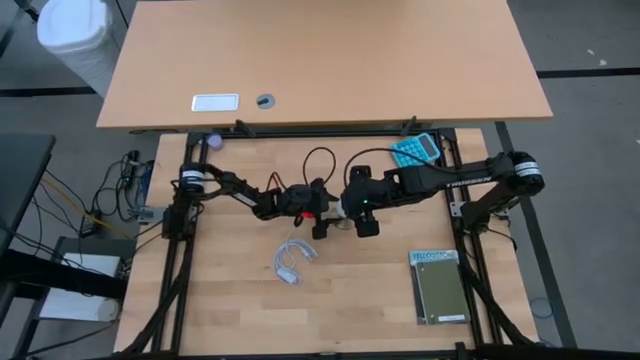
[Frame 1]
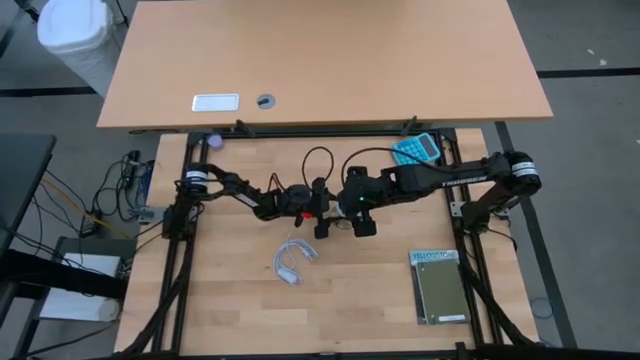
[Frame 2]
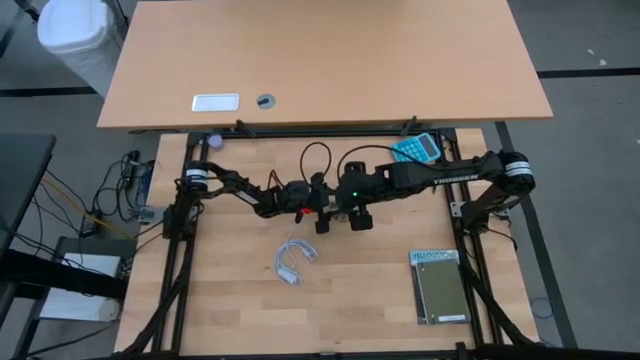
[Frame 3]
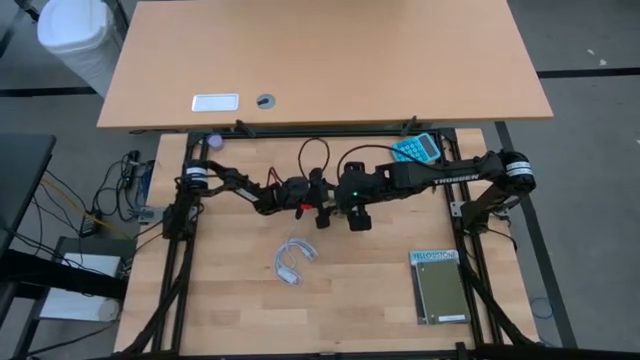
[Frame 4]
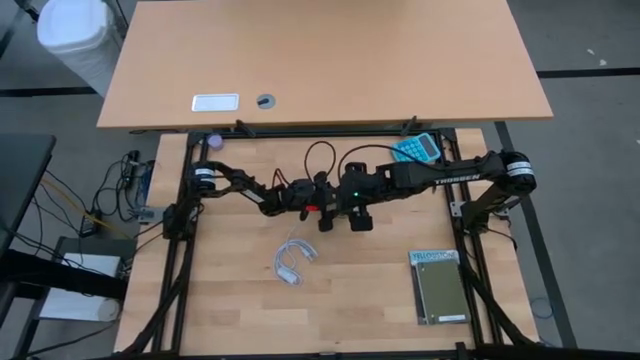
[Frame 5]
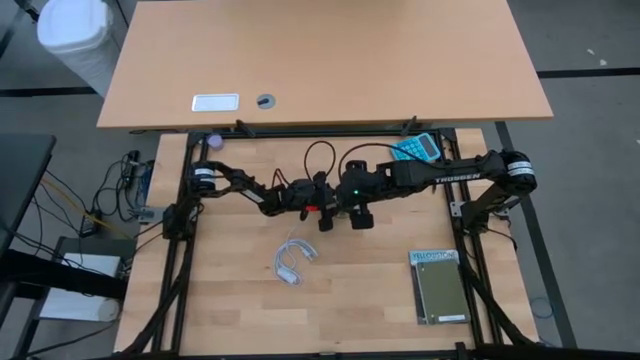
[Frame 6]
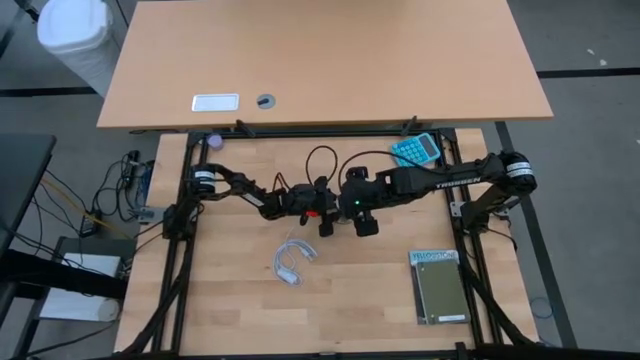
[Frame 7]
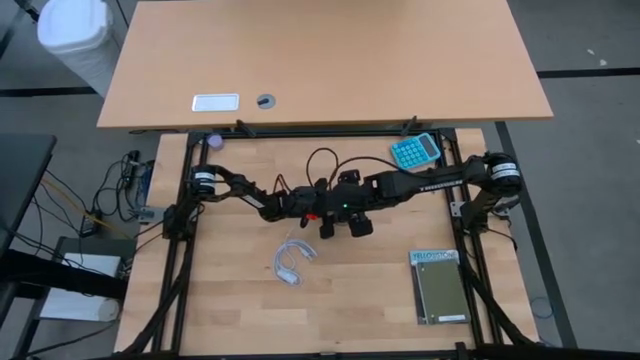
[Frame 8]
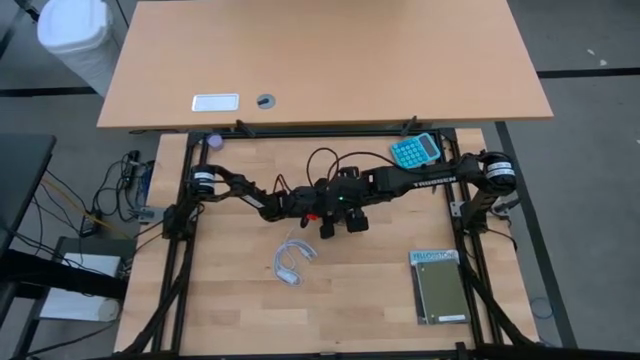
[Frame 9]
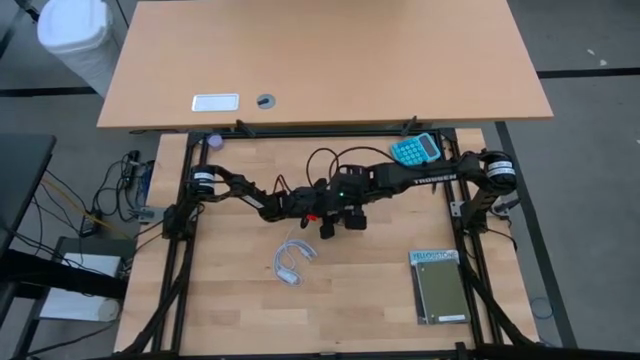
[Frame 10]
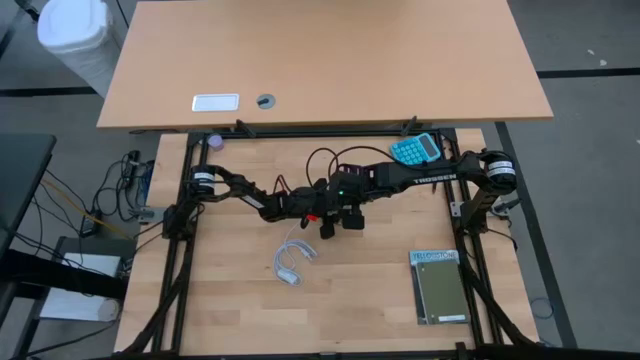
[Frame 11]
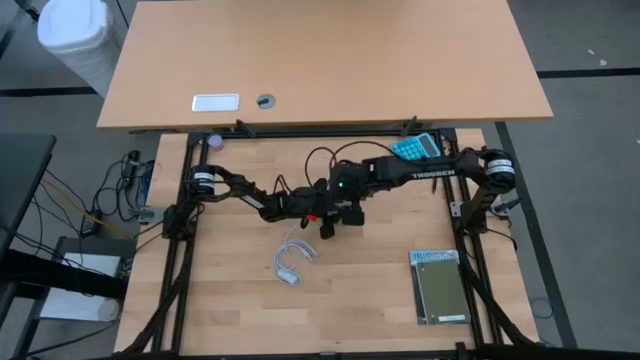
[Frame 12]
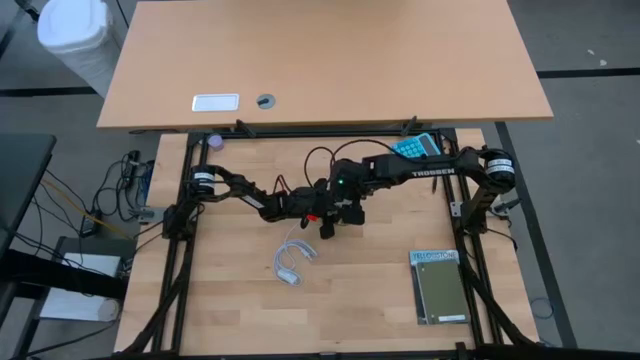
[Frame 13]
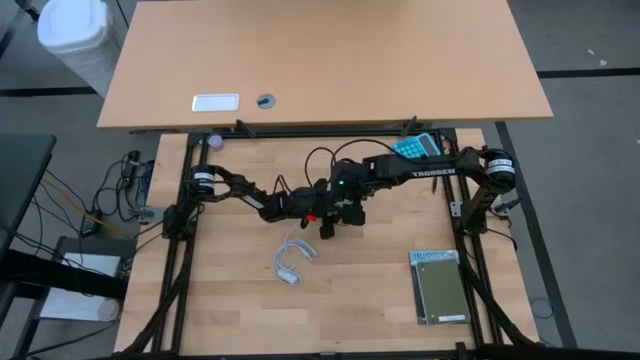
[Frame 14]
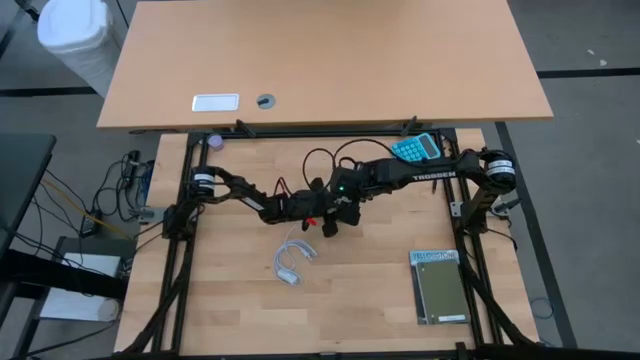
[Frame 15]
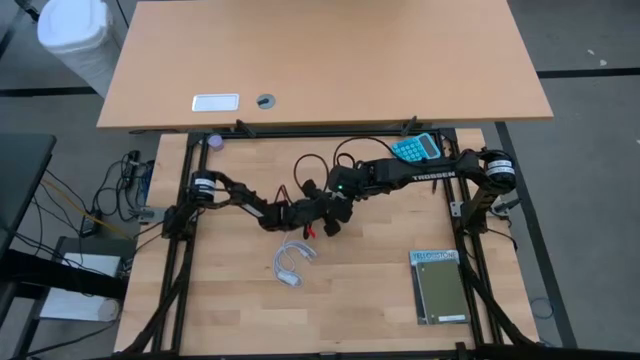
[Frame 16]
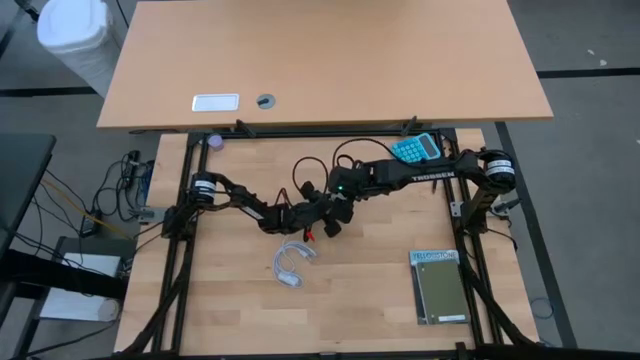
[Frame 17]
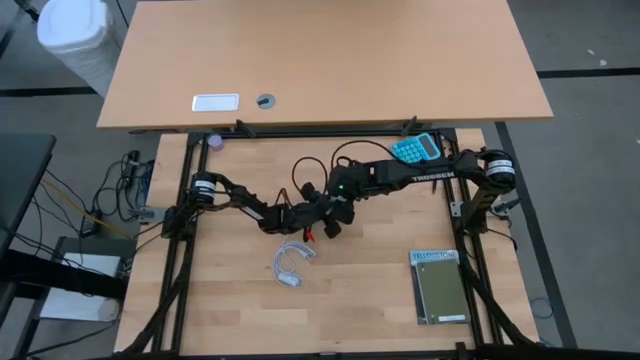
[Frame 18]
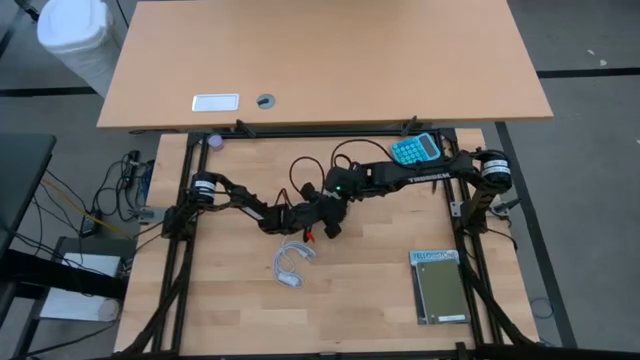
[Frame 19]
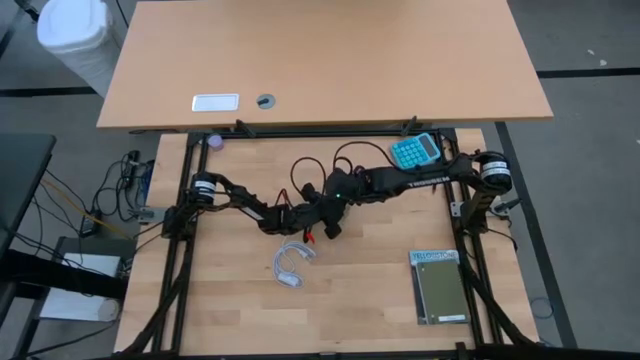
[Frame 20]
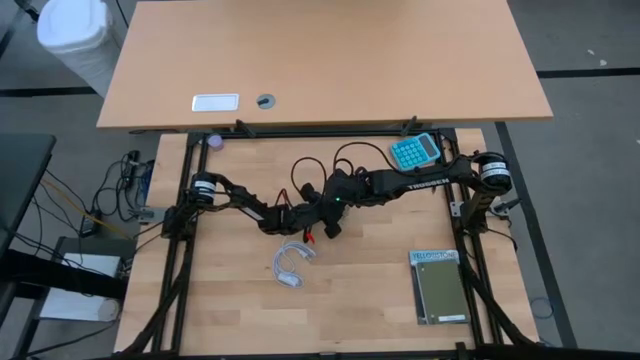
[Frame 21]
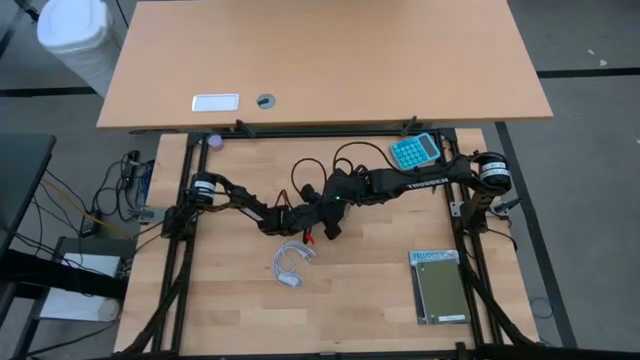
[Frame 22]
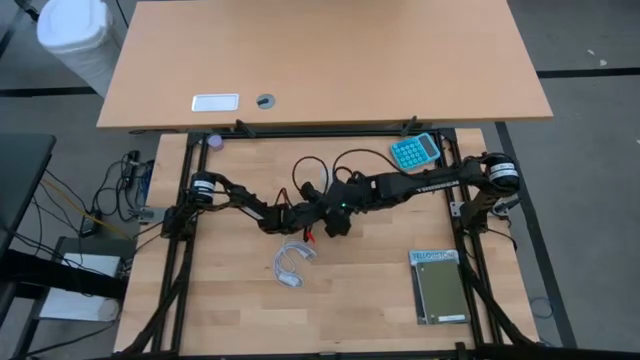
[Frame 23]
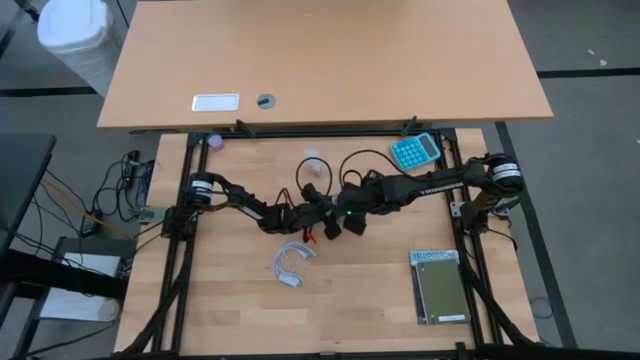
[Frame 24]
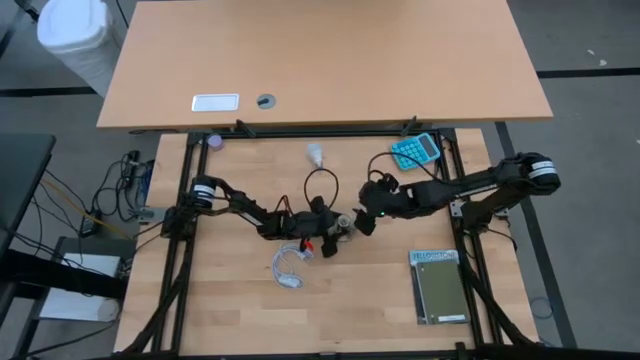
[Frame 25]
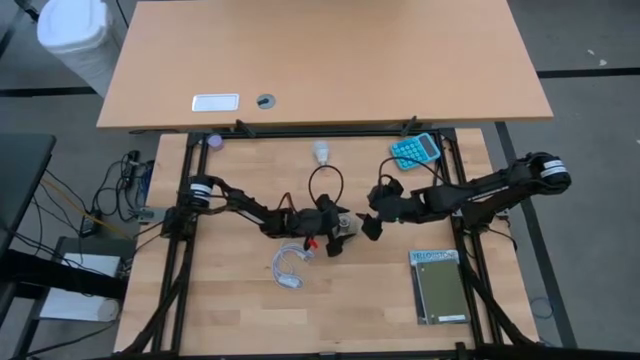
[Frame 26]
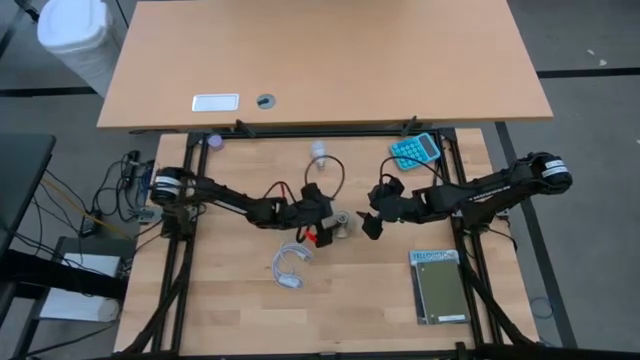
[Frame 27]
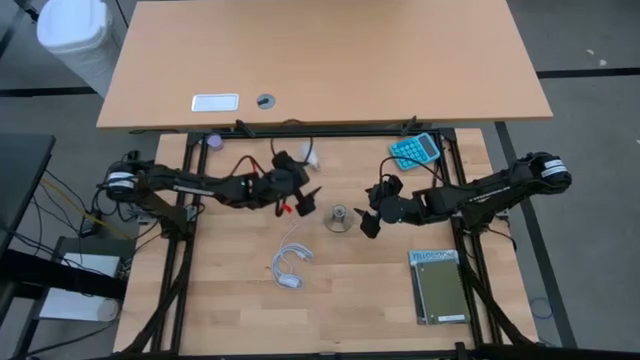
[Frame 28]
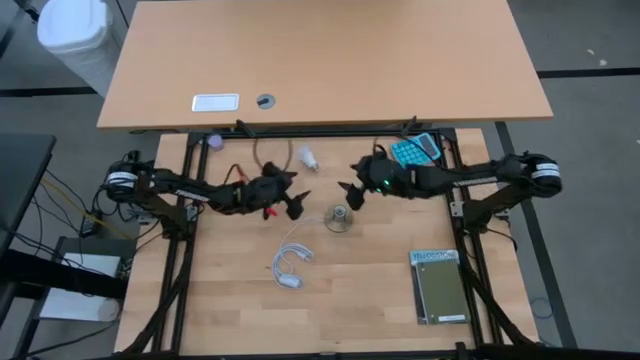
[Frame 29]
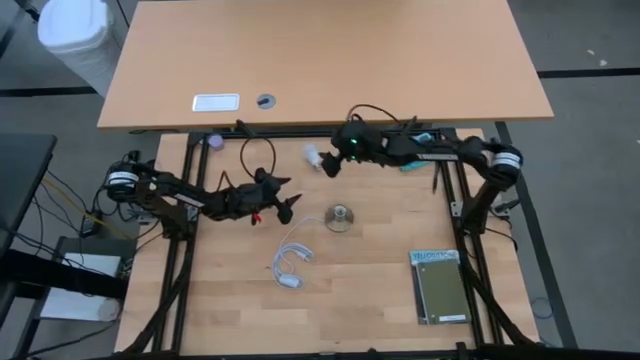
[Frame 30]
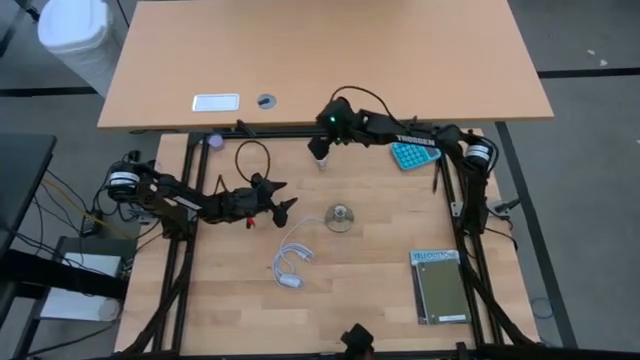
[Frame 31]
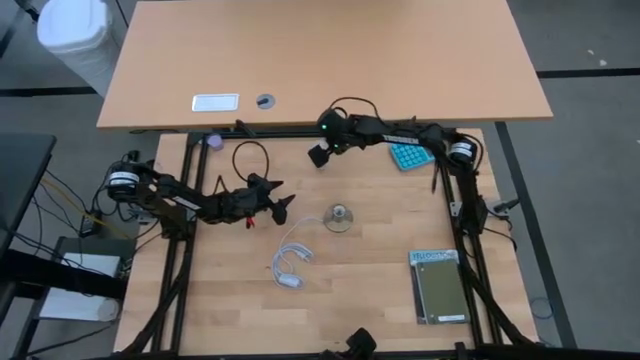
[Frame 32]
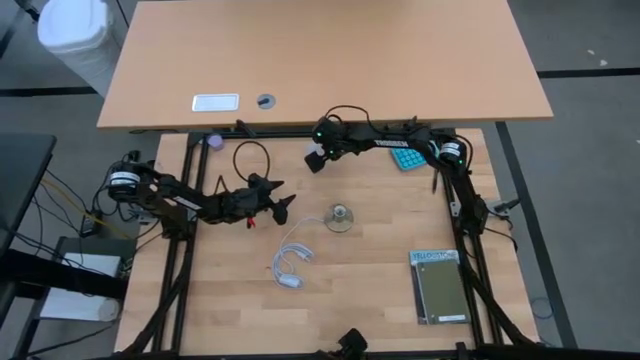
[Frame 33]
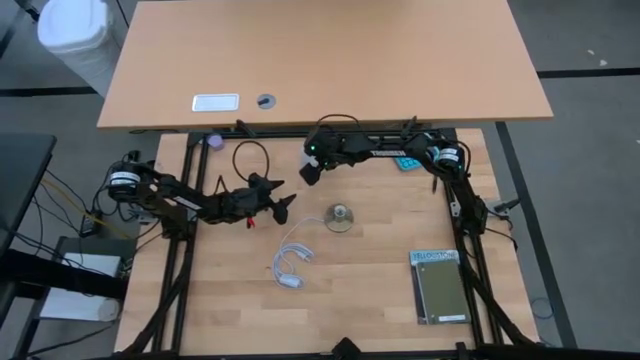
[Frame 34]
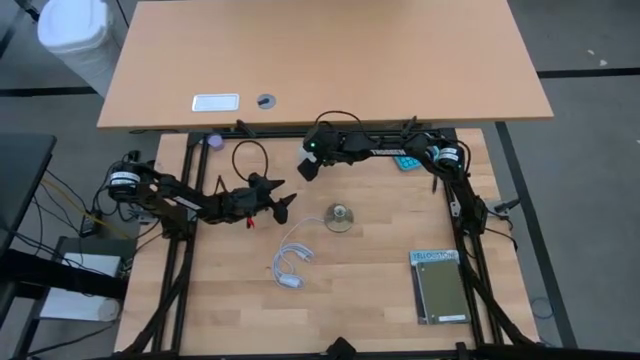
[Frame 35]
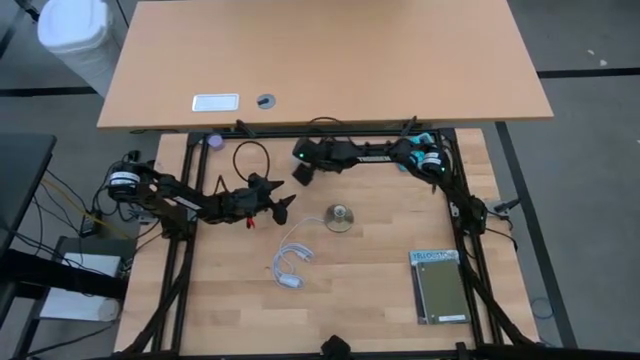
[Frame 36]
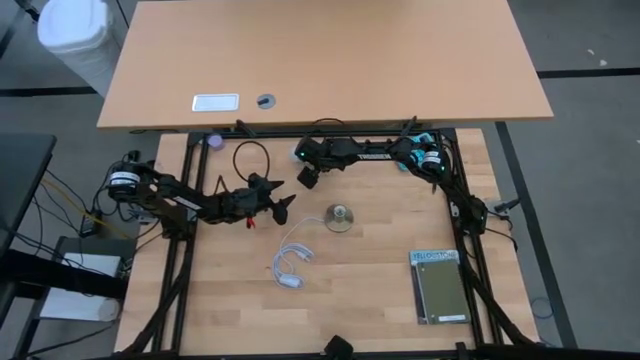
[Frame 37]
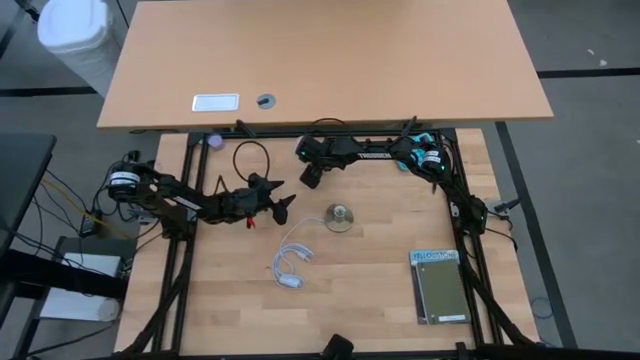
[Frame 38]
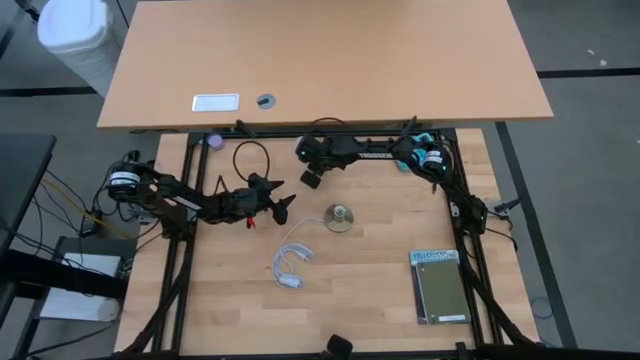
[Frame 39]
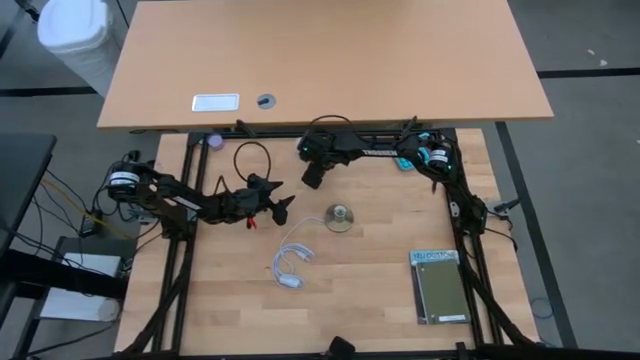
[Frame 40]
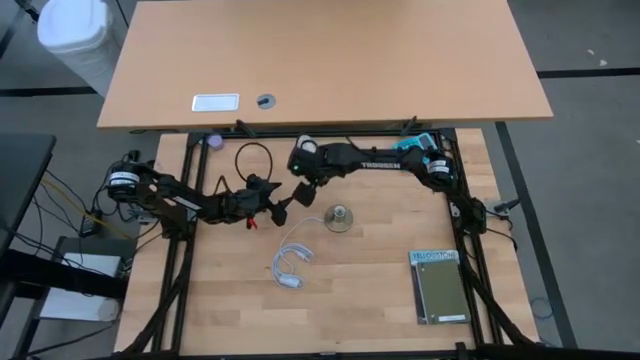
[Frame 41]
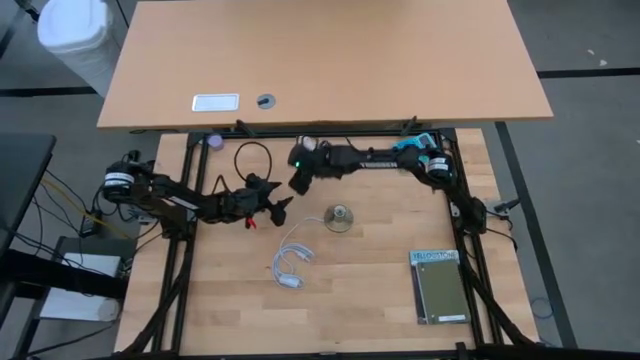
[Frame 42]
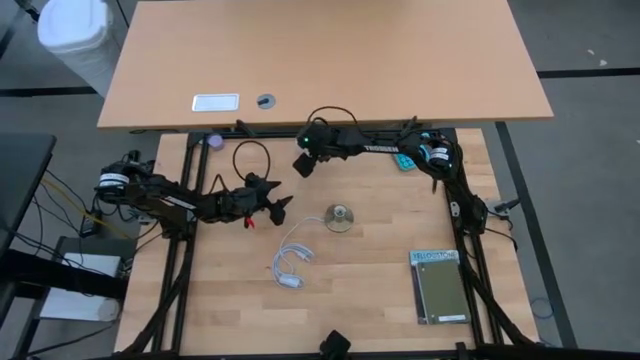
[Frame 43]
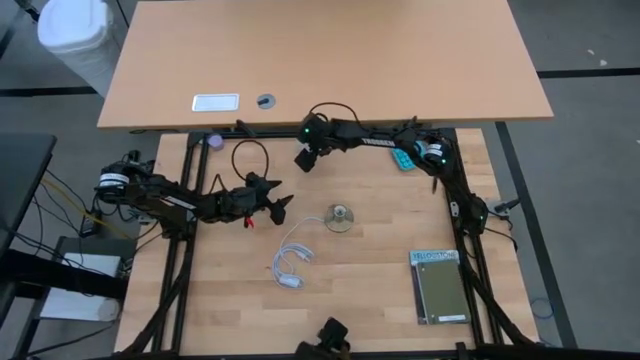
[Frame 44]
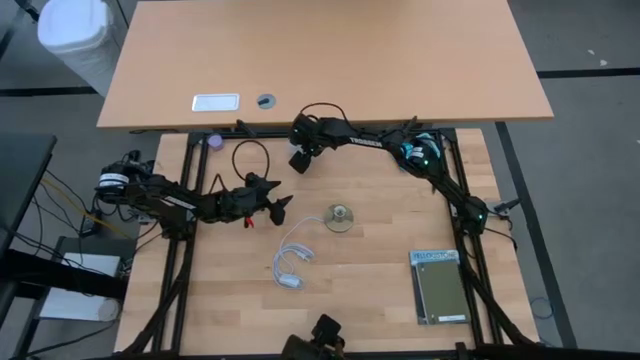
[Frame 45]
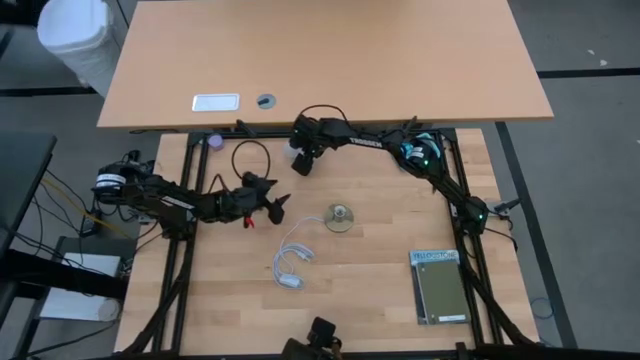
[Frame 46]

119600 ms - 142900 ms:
Task: Screw lightbulb
Insert the lightbulb into the socket
